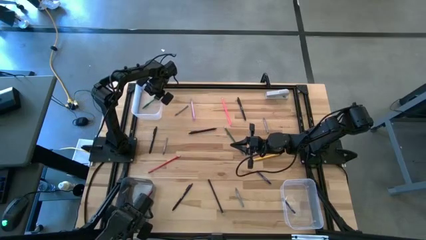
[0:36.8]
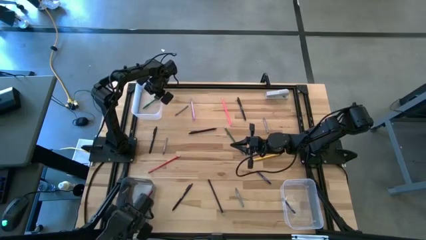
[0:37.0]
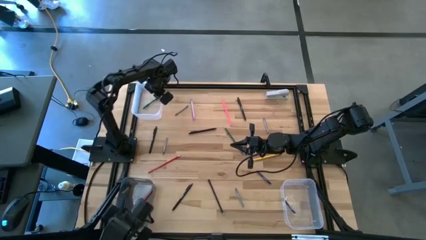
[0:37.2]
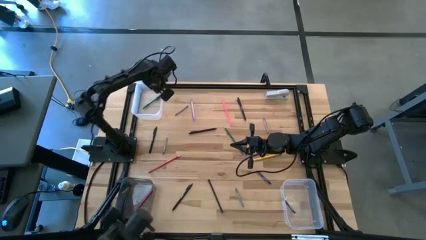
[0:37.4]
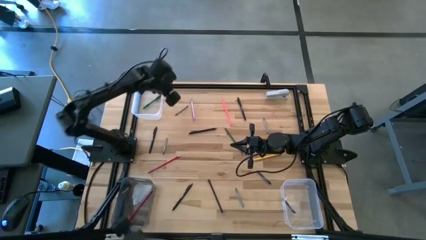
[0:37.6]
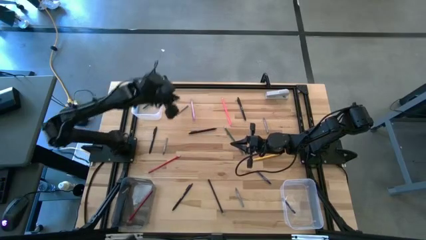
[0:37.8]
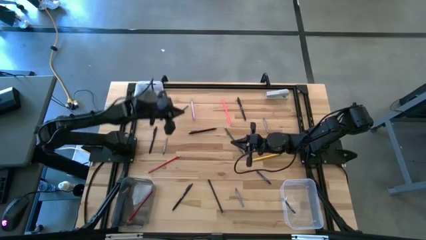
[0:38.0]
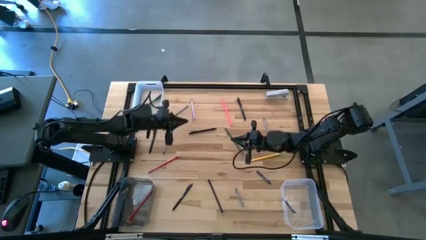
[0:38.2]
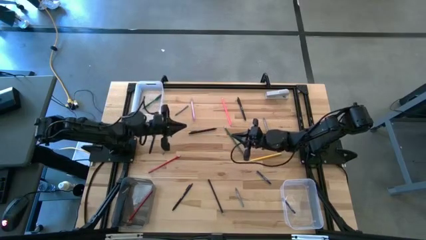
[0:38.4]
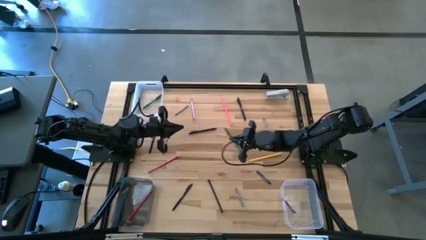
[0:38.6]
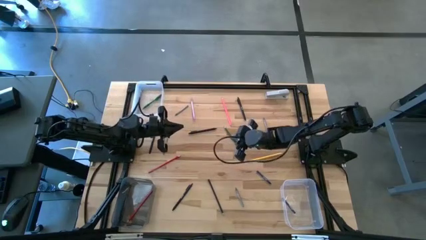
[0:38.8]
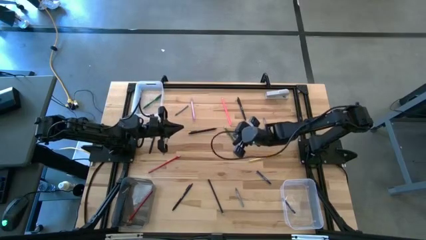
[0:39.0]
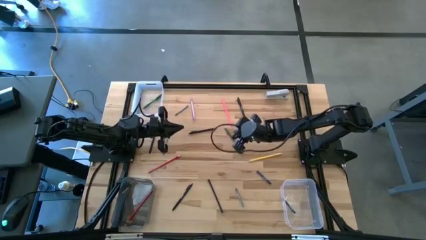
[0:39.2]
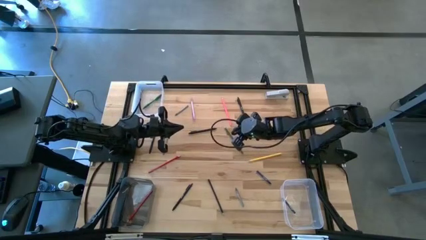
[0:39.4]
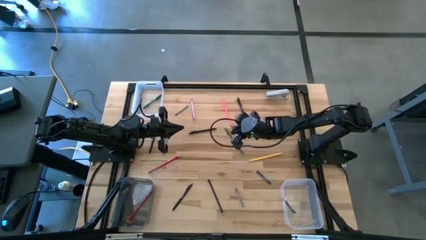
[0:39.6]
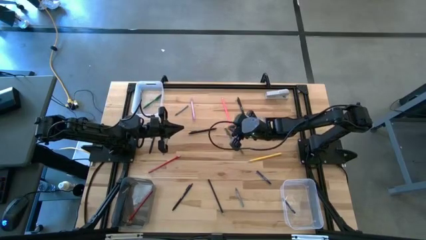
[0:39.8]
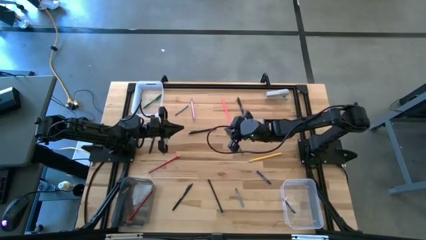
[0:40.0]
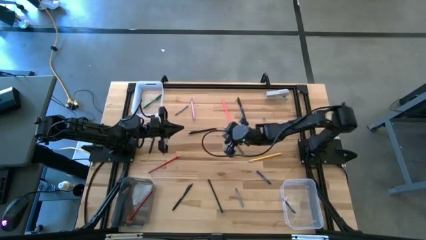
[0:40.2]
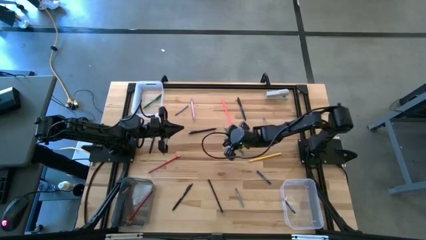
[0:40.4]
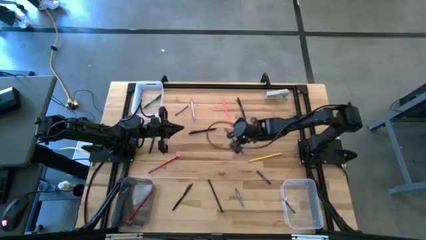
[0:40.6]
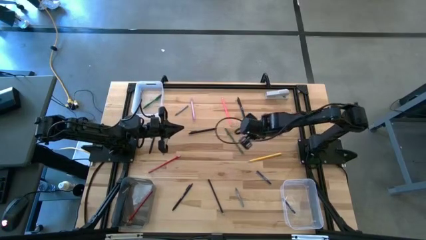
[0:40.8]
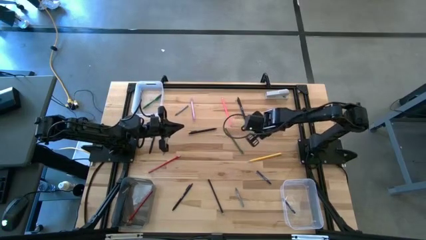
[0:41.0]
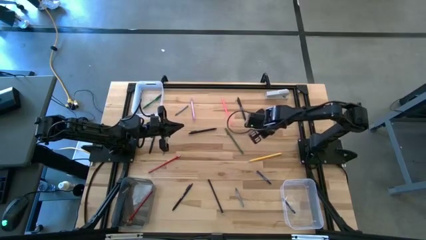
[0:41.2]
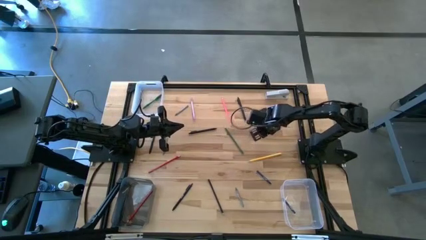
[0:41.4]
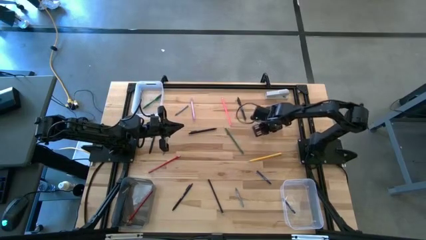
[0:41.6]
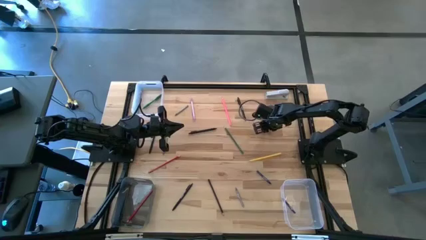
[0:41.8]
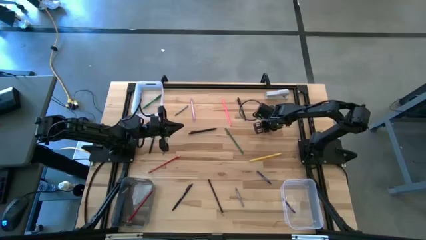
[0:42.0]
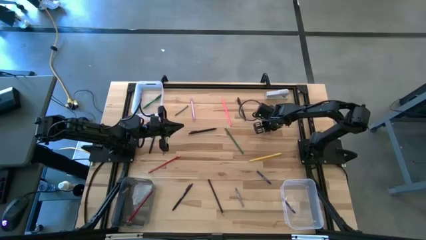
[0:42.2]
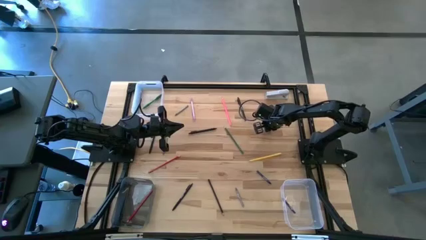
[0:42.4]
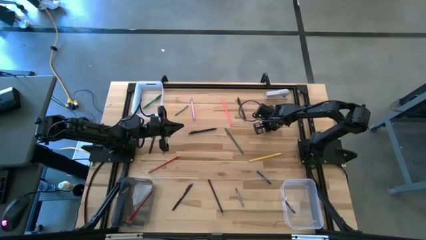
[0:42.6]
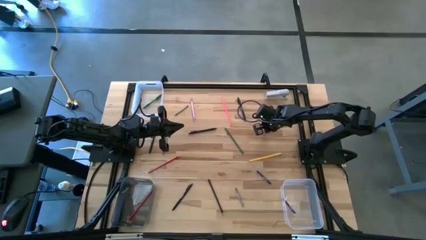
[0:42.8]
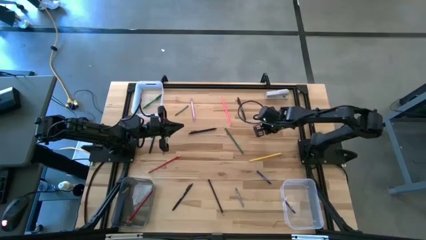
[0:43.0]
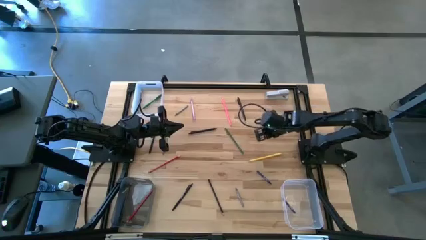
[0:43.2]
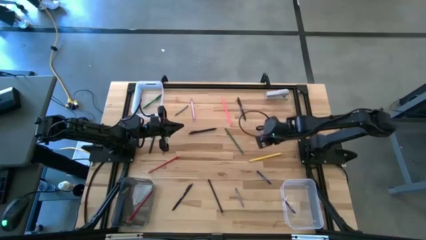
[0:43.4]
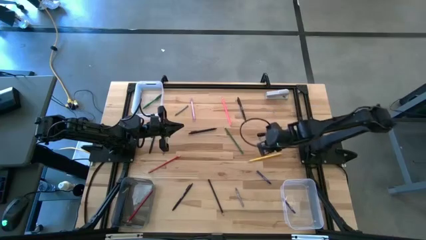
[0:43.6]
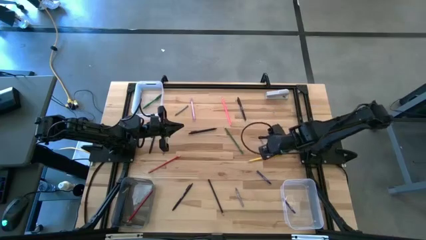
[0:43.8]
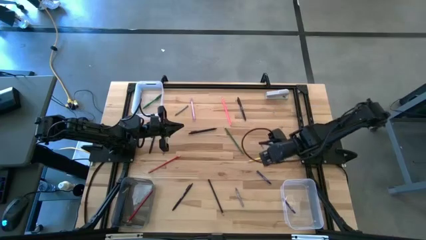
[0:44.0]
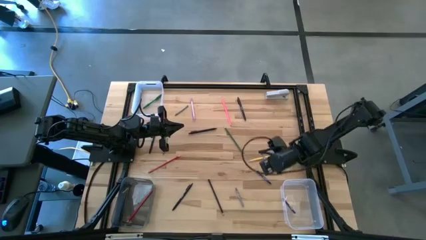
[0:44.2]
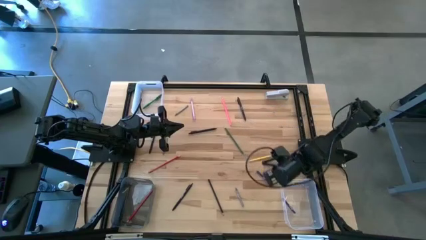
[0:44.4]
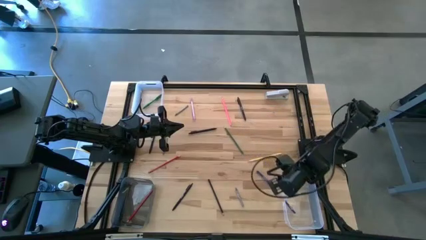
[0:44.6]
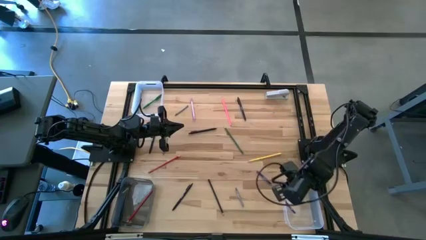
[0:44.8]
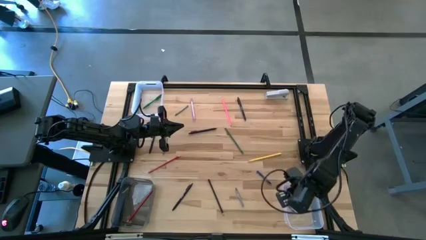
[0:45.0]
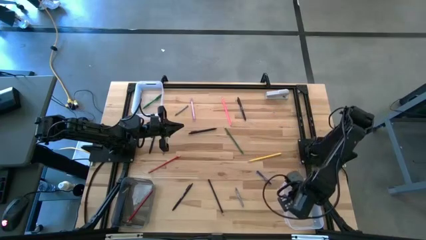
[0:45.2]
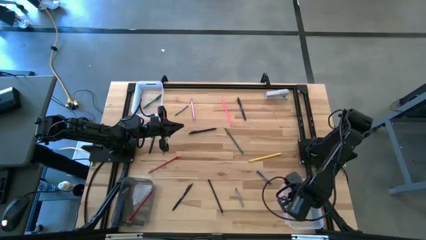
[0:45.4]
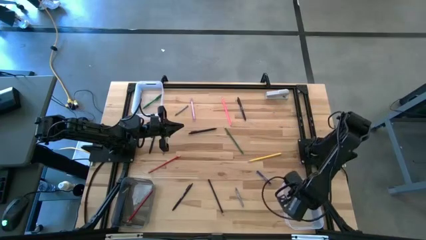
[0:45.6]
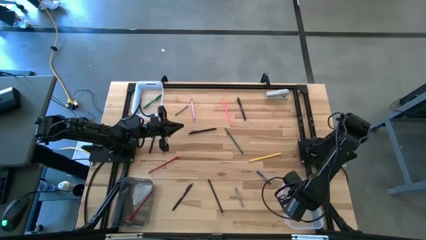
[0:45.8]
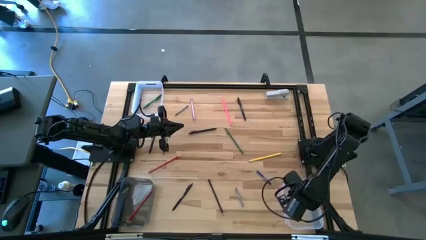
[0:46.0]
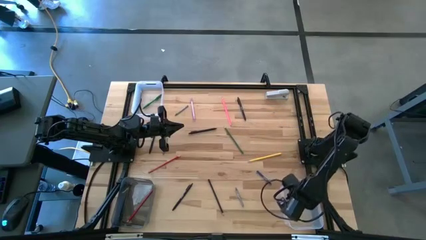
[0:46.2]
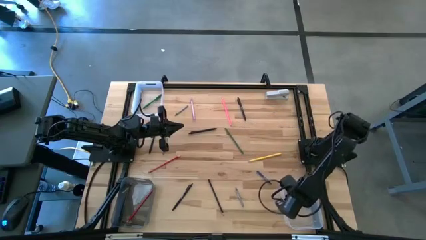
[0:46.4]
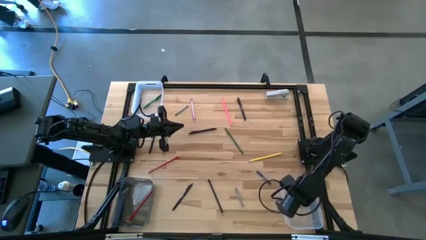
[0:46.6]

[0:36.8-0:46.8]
Task: Sort crayons/erasers/pens/pencils in bins
Put the top right gray crayon into the bottom transparent bin
